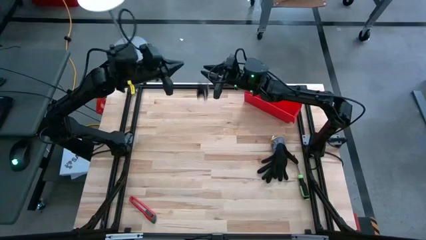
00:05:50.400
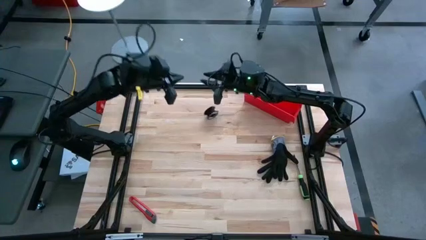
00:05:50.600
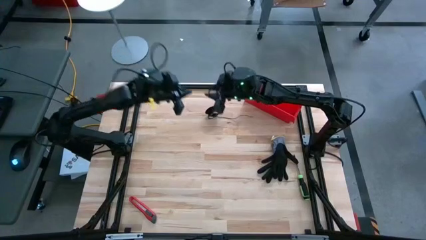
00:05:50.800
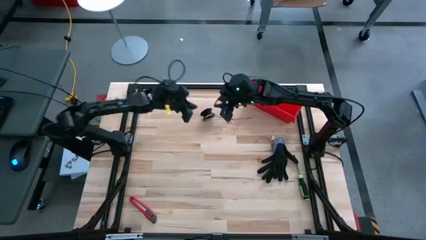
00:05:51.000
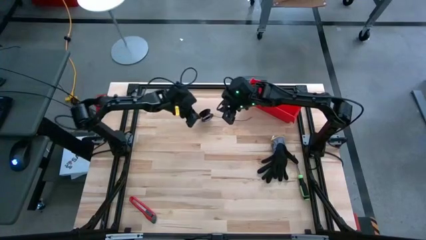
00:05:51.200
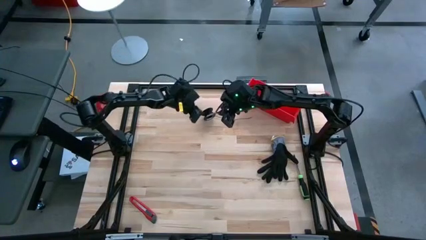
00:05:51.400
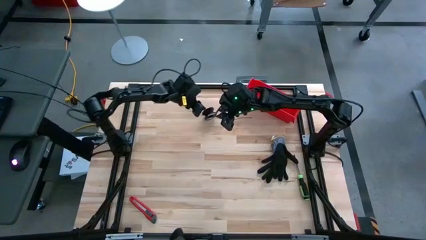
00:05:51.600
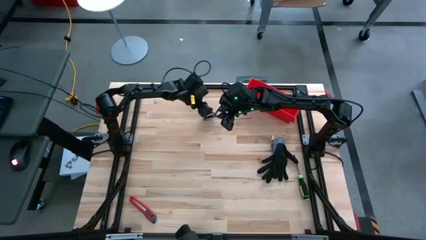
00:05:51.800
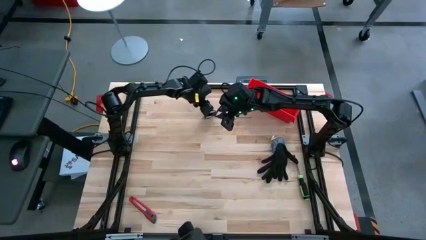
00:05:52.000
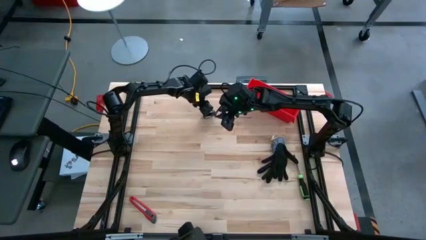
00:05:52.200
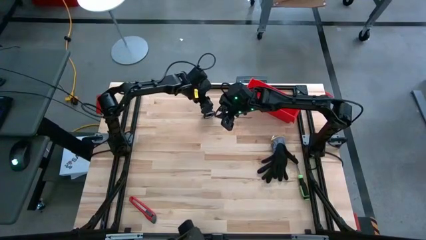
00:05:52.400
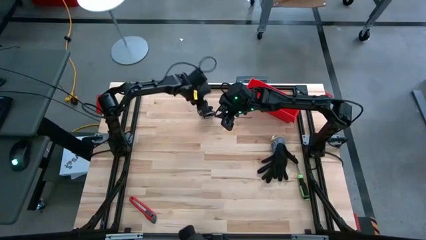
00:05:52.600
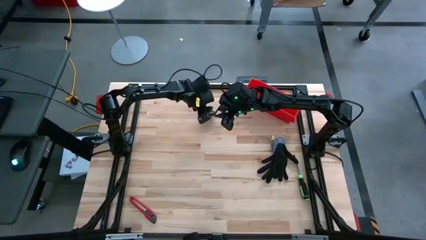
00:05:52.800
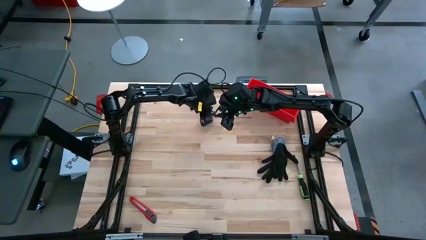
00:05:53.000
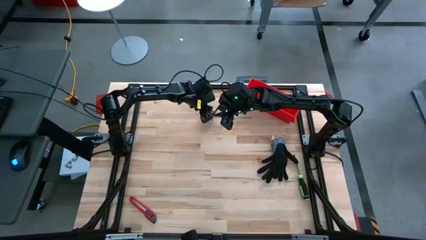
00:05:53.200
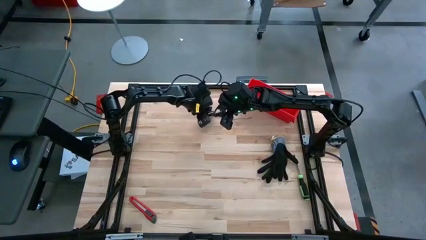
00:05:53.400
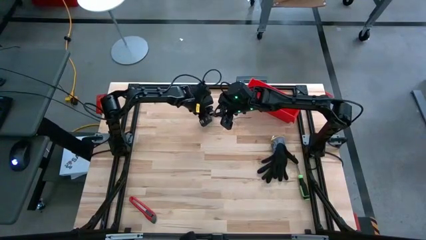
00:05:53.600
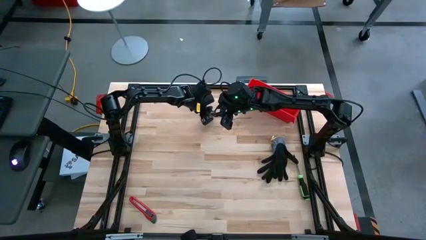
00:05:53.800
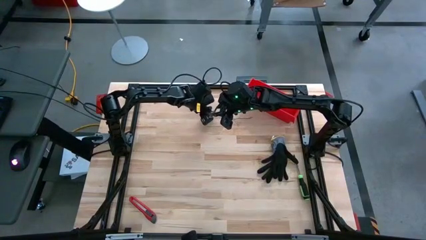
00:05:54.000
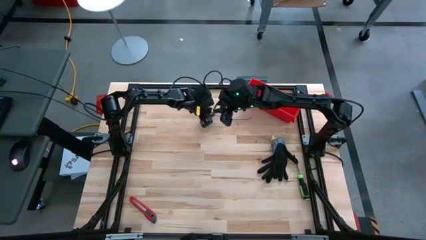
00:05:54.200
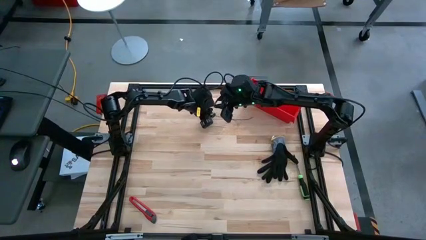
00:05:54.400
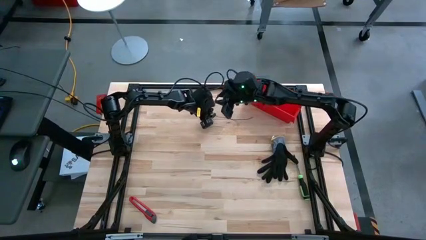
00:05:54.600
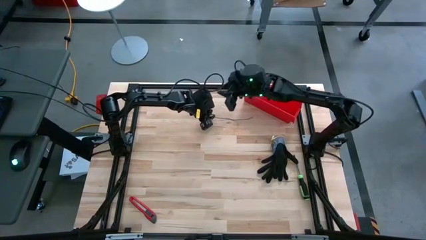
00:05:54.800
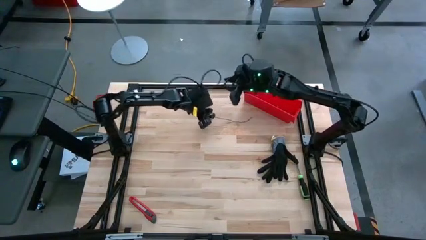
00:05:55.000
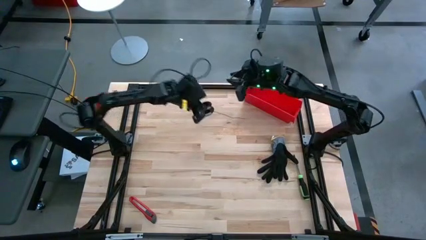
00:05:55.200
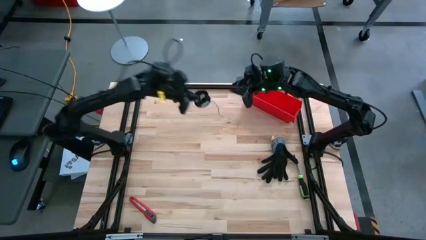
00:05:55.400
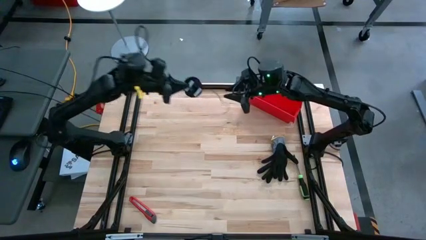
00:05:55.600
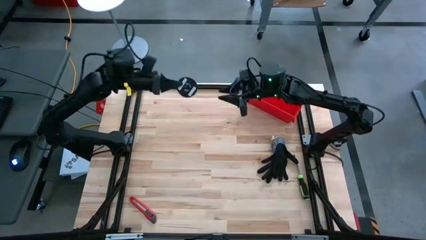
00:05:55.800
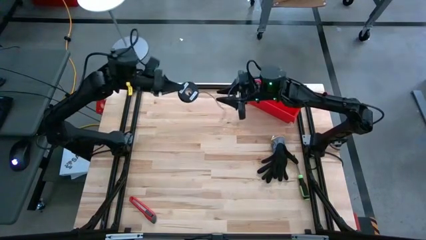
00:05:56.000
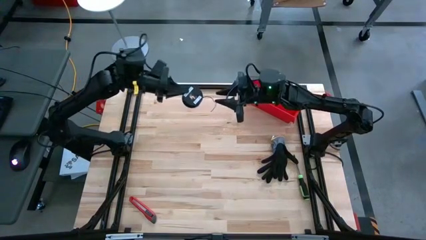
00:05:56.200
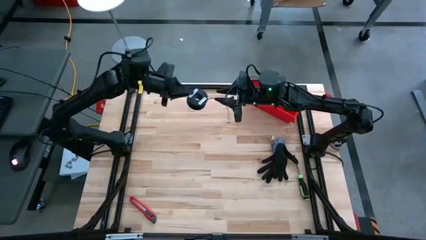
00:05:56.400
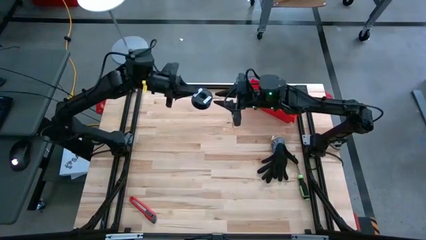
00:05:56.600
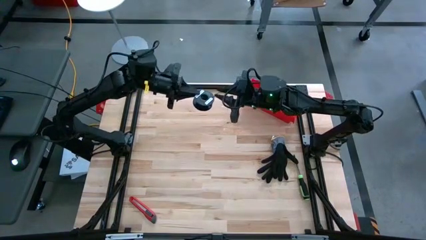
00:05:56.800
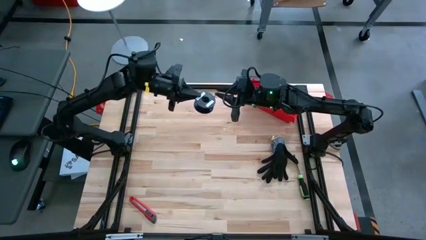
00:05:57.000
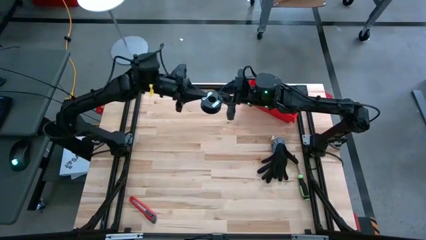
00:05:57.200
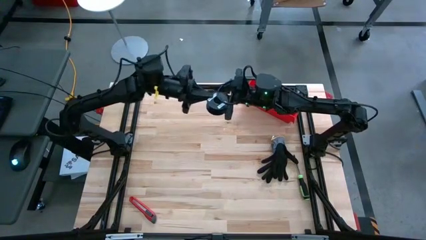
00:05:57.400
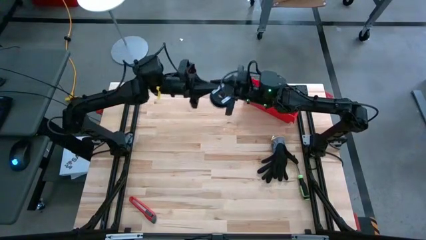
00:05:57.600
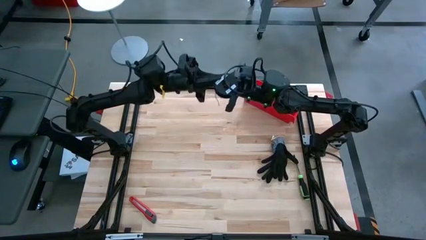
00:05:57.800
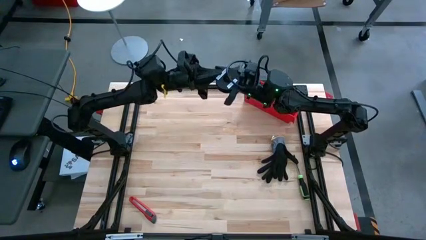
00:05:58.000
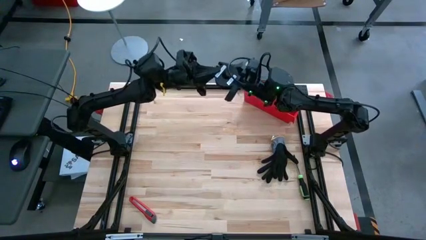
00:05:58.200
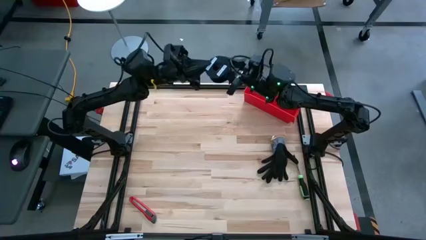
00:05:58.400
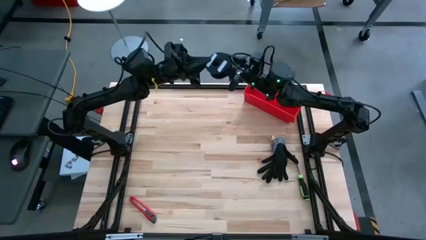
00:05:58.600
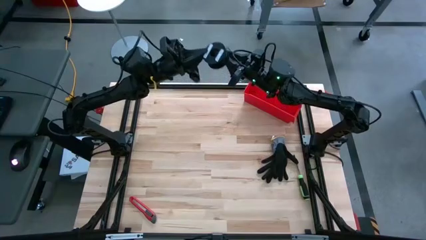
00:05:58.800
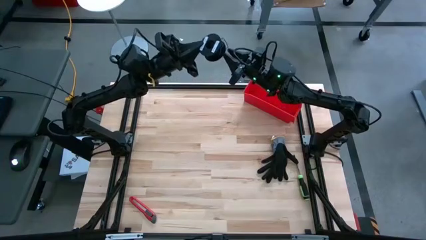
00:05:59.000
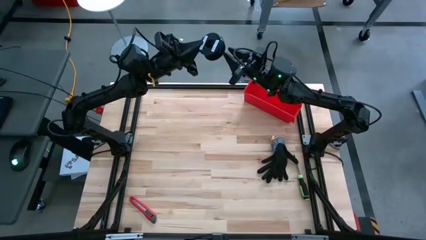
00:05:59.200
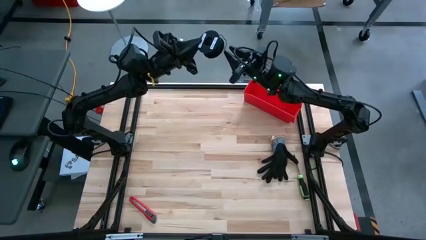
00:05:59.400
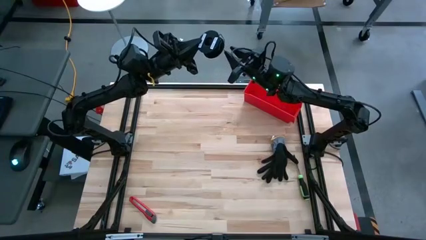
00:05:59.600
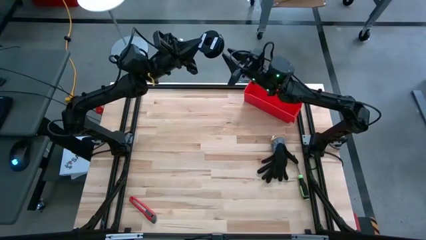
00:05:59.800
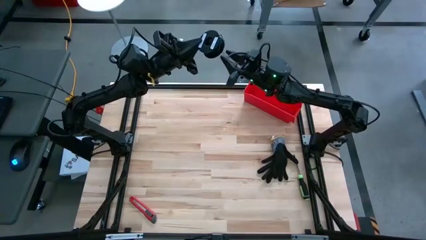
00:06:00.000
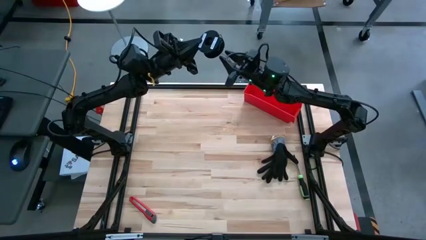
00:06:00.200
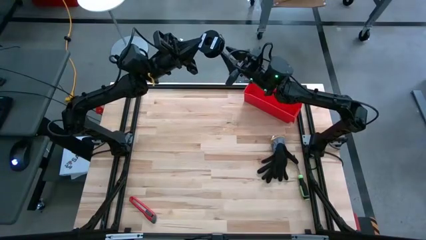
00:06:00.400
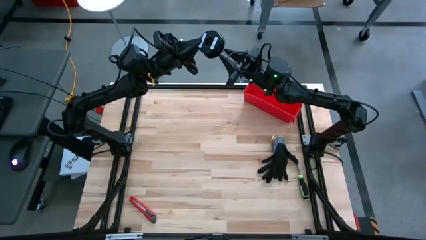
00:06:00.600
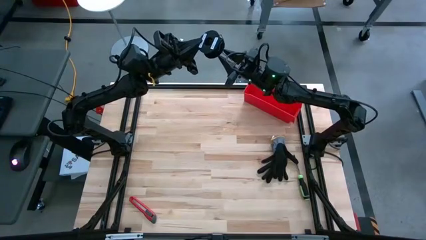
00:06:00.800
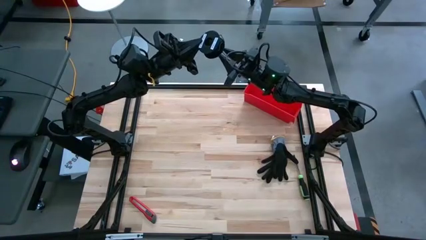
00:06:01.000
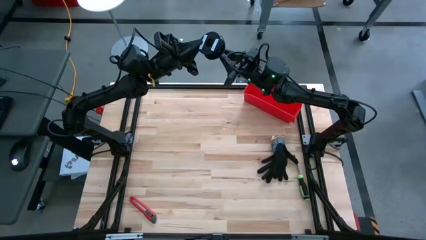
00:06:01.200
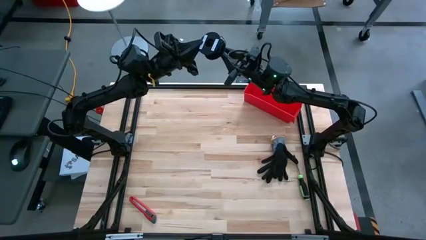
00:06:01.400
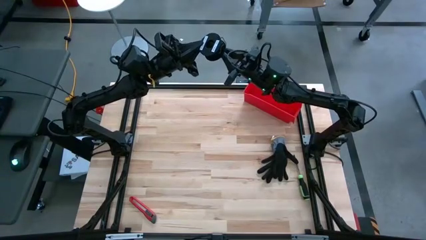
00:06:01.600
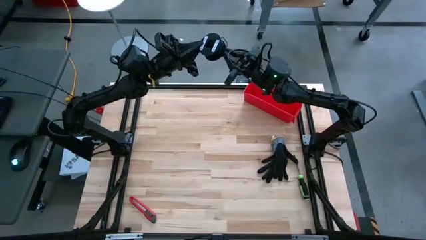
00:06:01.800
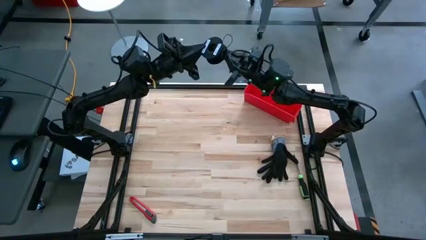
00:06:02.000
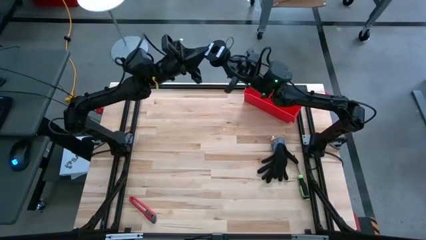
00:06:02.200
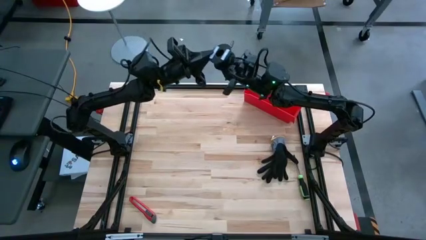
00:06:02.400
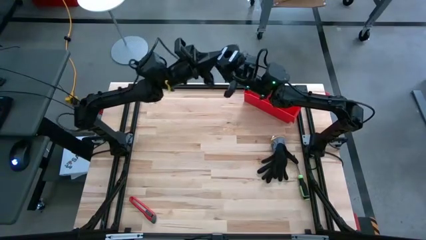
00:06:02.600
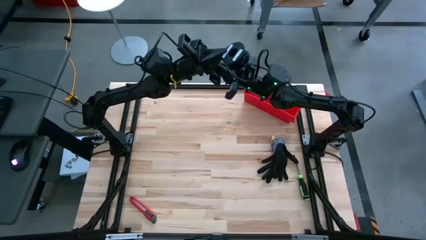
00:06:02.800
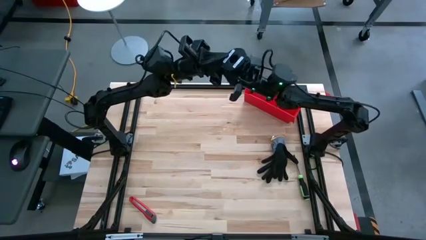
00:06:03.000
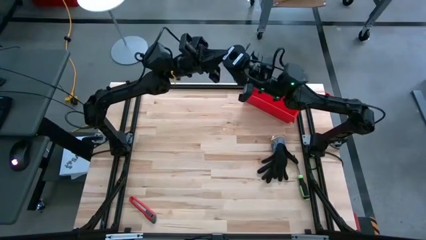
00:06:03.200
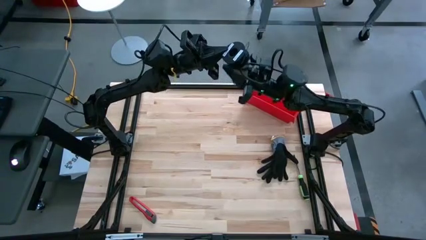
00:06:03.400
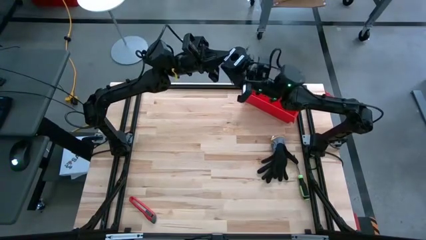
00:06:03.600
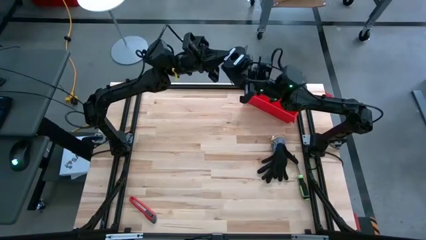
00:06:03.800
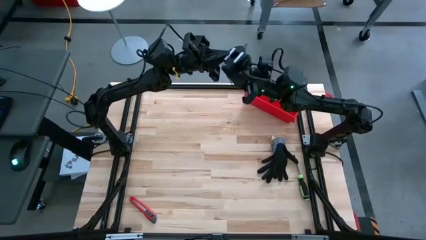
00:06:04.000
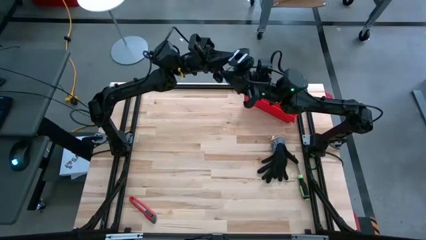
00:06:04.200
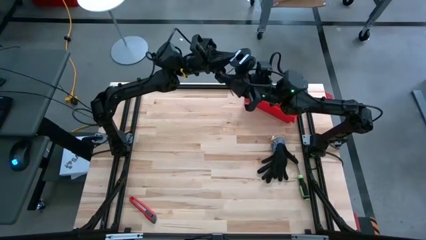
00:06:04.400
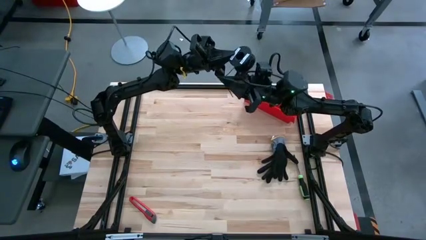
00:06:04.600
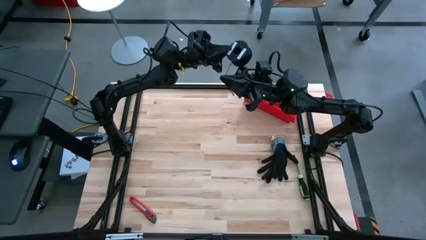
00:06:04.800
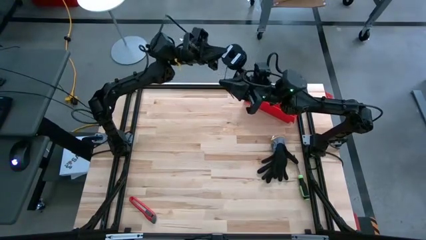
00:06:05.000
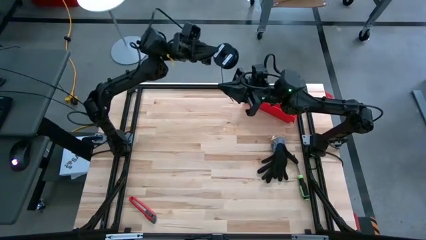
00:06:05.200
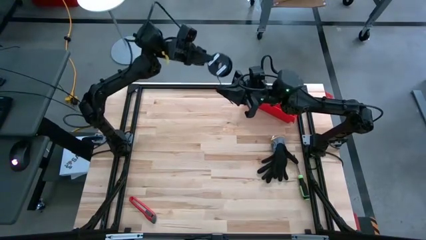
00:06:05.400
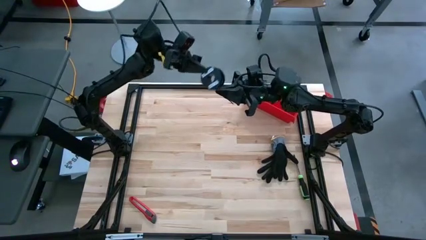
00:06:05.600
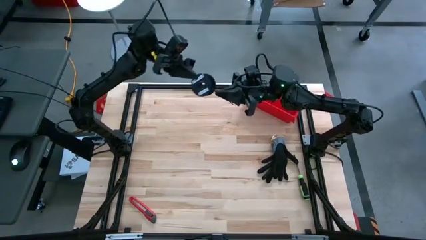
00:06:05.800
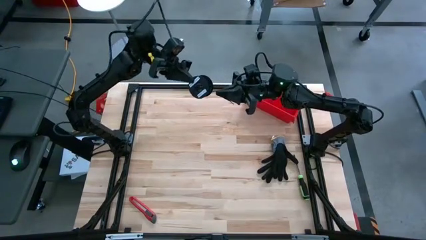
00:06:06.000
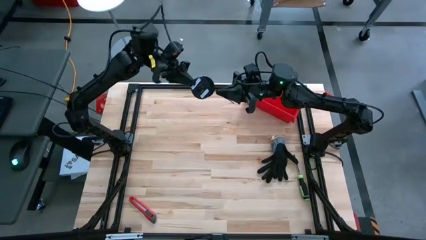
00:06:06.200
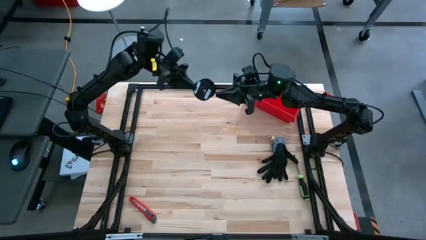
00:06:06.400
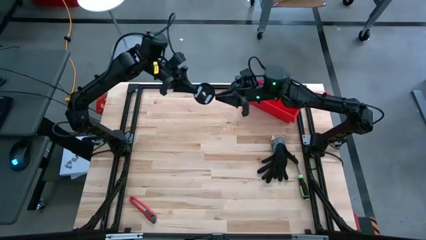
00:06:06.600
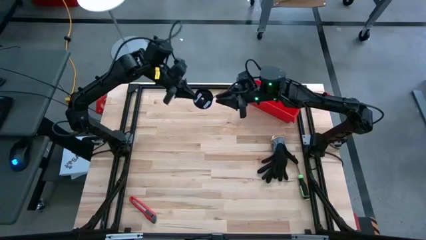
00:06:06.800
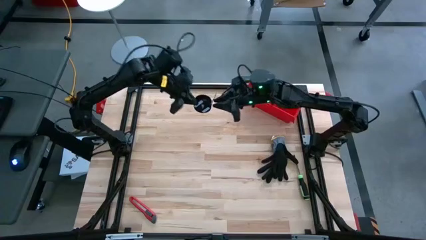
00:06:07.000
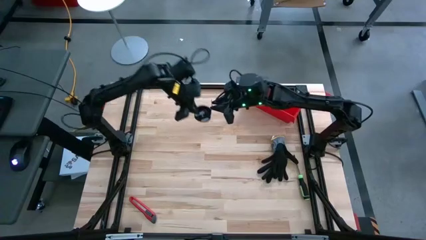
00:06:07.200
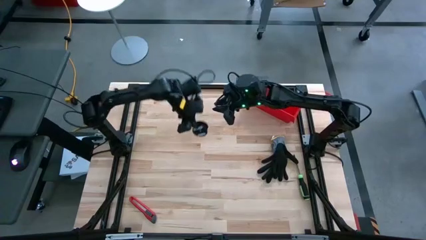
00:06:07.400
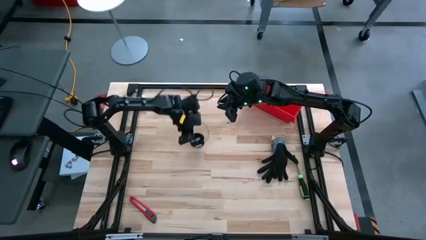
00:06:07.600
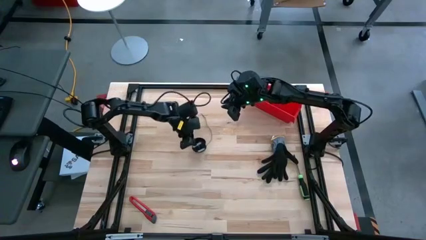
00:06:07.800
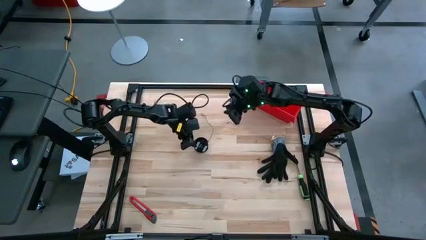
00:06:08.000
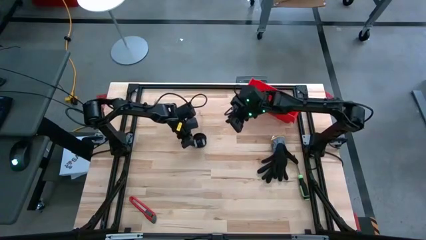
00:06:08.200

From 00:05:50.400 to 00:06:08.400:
Task: Coil cords
Coil the black wire on the spool
